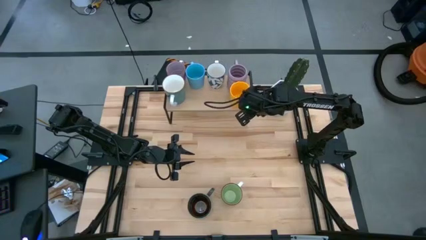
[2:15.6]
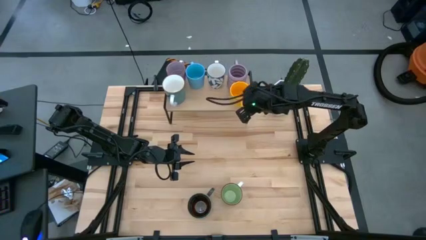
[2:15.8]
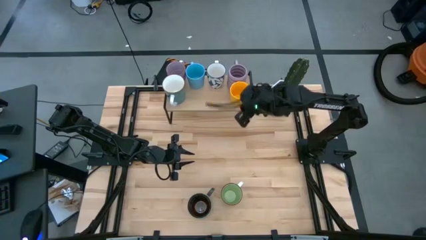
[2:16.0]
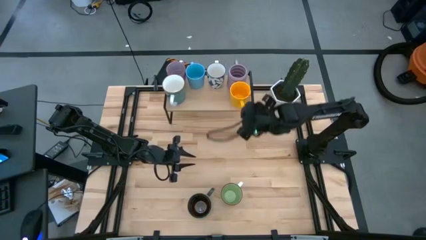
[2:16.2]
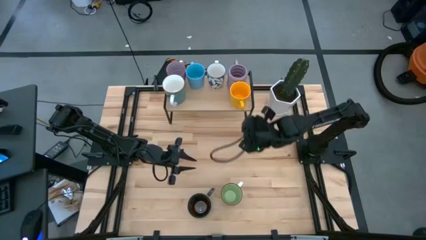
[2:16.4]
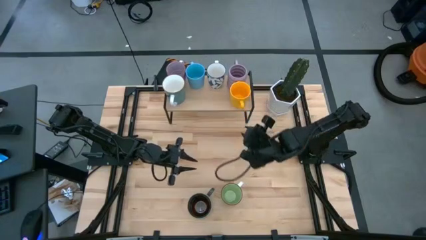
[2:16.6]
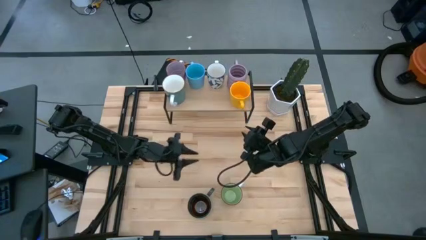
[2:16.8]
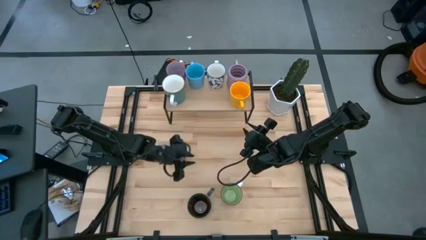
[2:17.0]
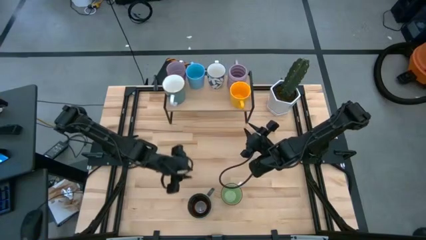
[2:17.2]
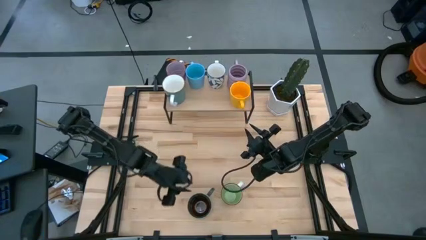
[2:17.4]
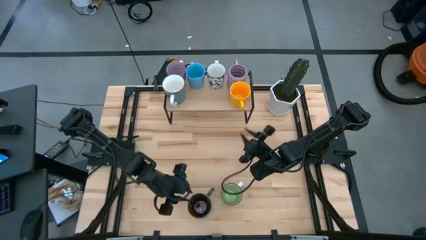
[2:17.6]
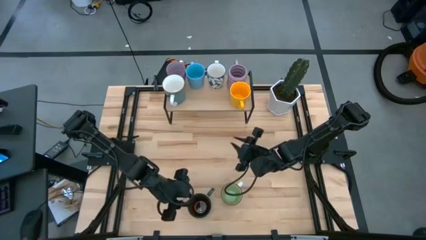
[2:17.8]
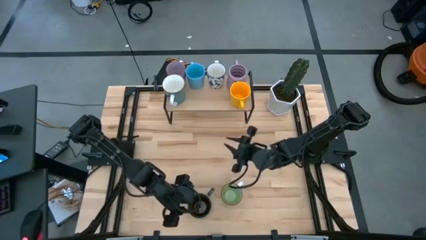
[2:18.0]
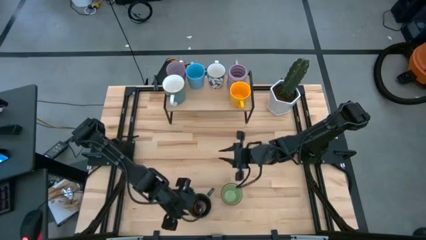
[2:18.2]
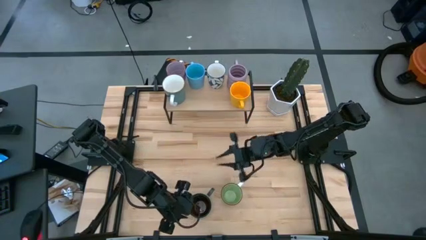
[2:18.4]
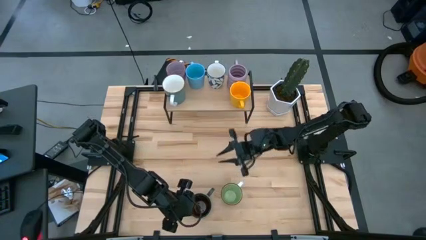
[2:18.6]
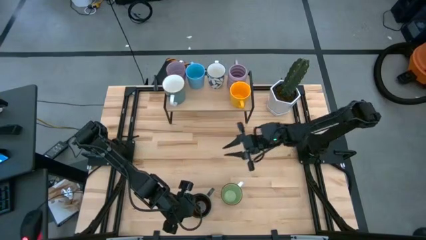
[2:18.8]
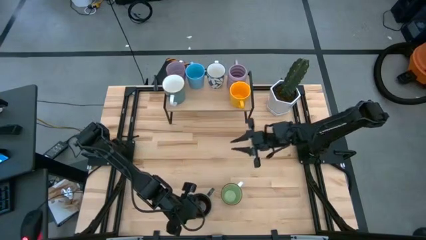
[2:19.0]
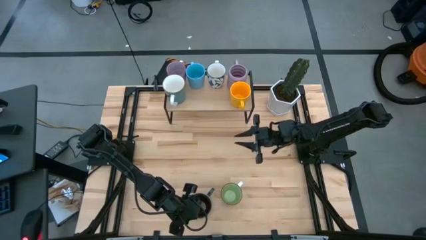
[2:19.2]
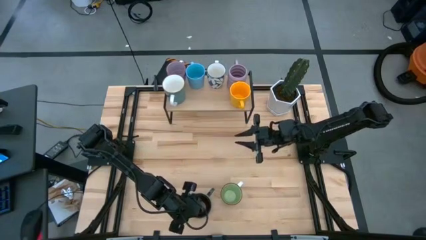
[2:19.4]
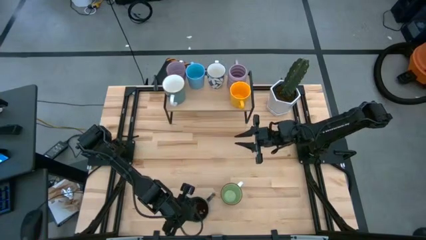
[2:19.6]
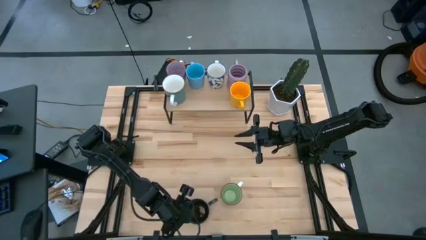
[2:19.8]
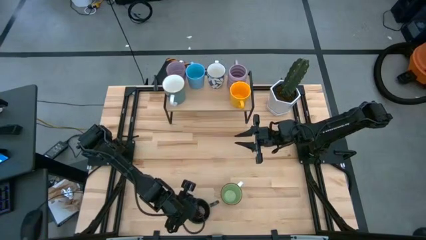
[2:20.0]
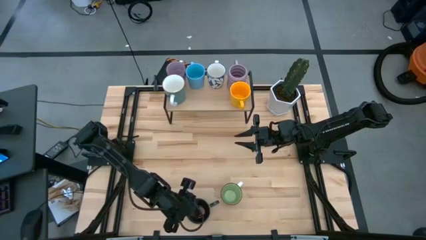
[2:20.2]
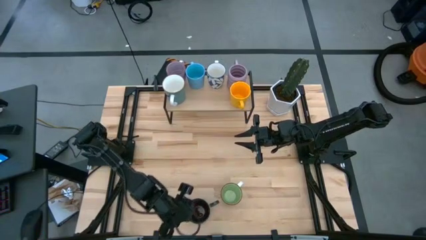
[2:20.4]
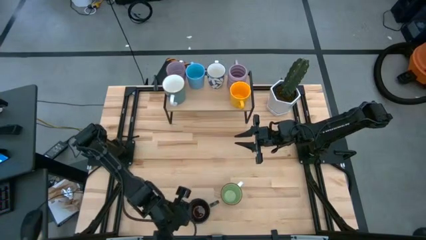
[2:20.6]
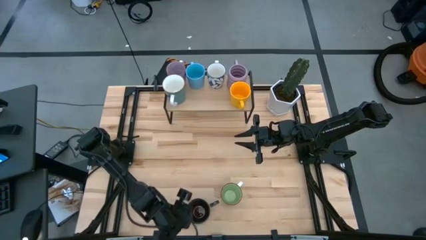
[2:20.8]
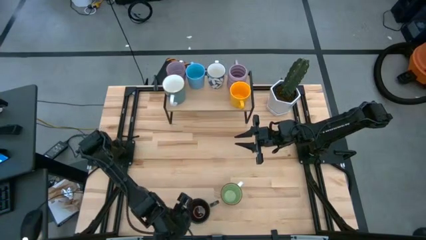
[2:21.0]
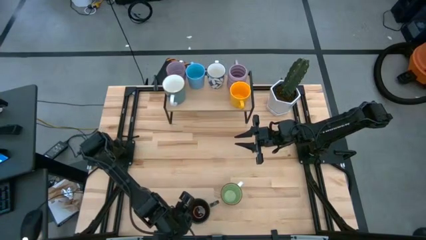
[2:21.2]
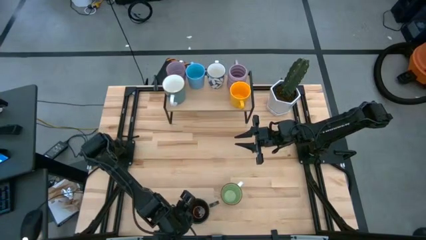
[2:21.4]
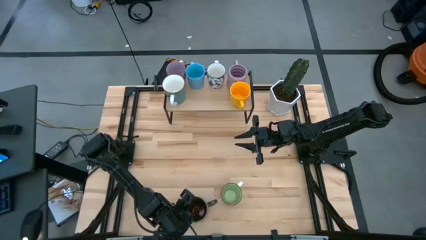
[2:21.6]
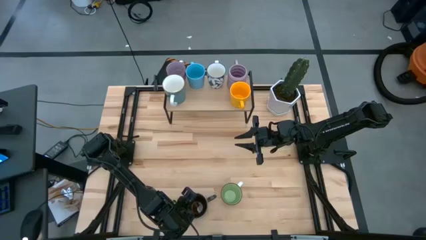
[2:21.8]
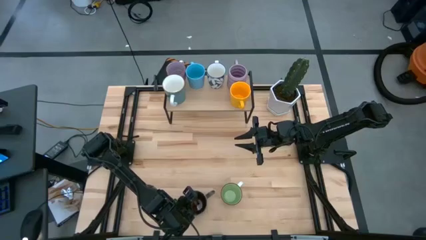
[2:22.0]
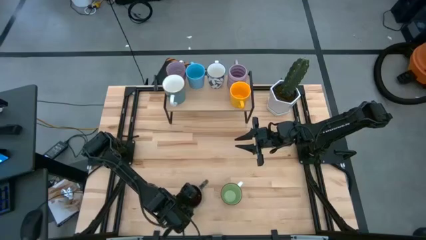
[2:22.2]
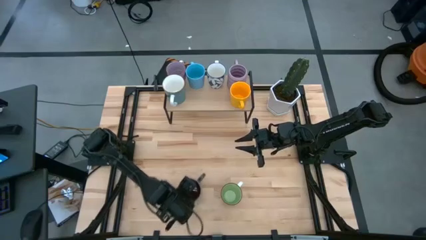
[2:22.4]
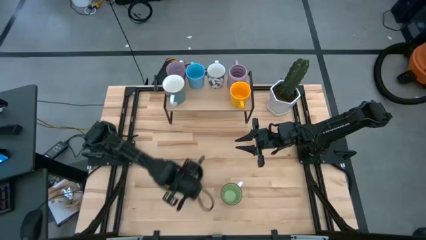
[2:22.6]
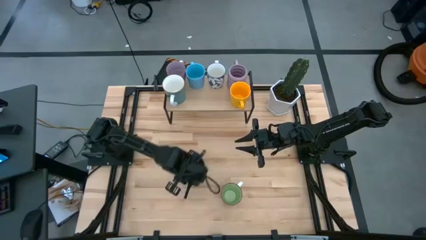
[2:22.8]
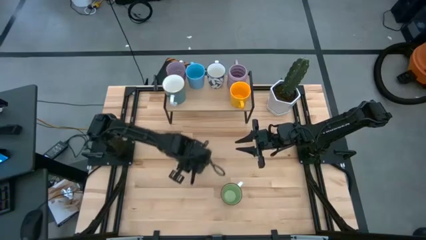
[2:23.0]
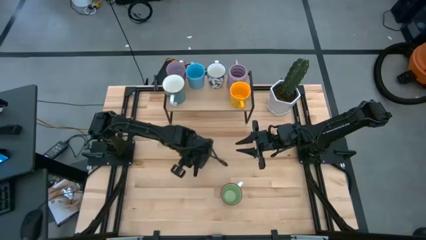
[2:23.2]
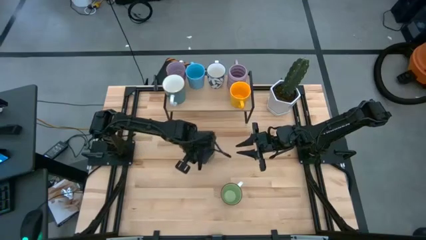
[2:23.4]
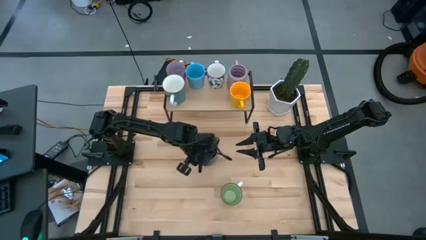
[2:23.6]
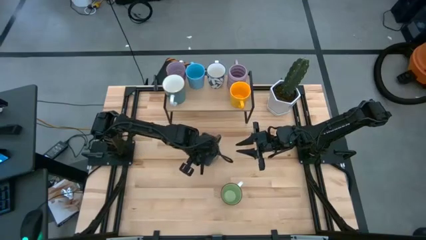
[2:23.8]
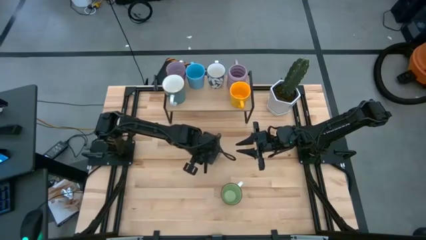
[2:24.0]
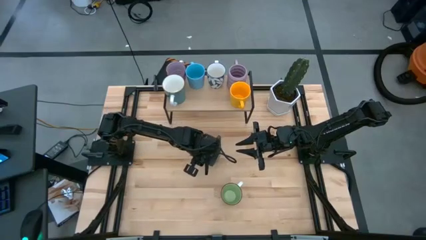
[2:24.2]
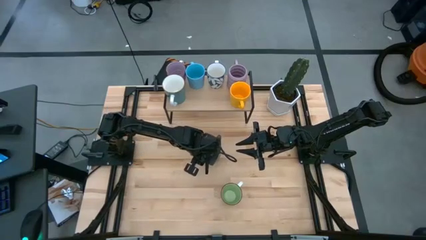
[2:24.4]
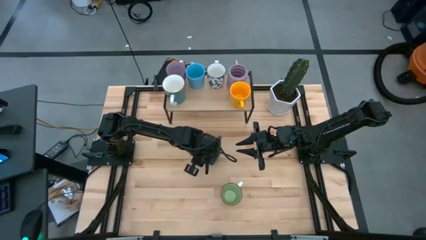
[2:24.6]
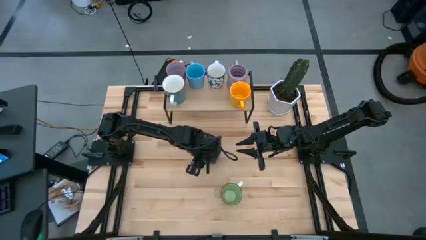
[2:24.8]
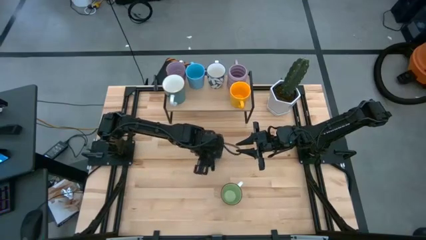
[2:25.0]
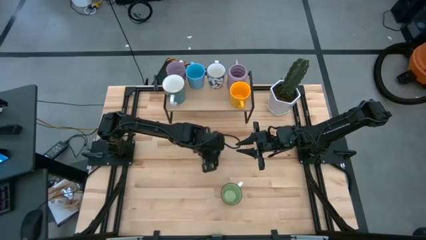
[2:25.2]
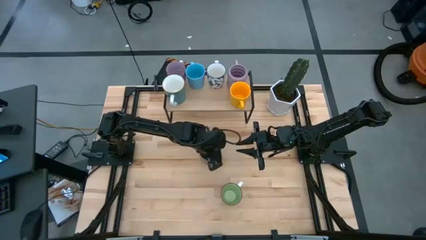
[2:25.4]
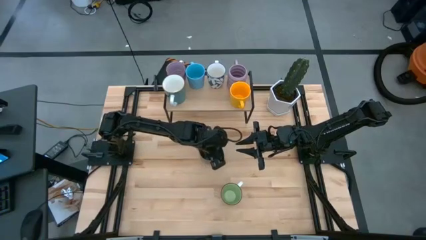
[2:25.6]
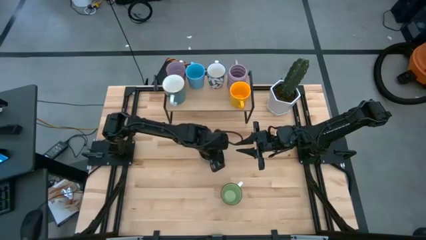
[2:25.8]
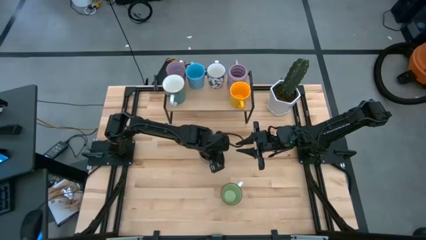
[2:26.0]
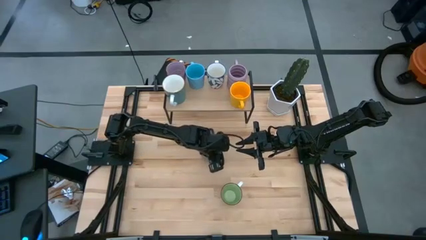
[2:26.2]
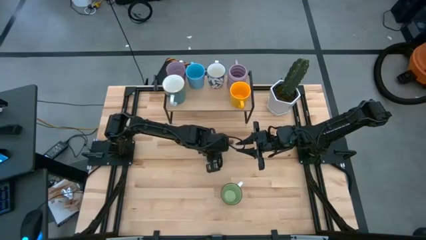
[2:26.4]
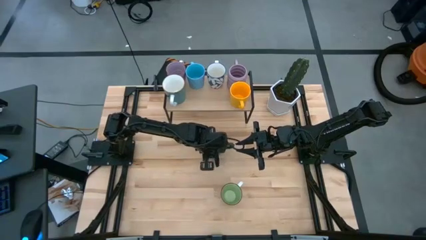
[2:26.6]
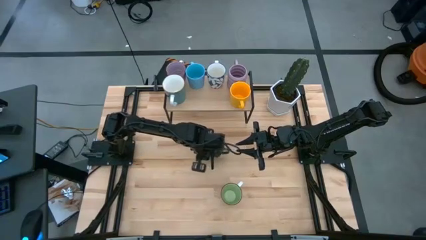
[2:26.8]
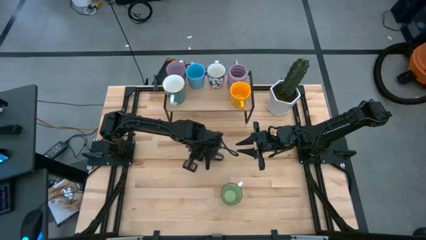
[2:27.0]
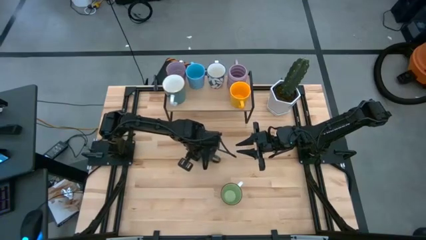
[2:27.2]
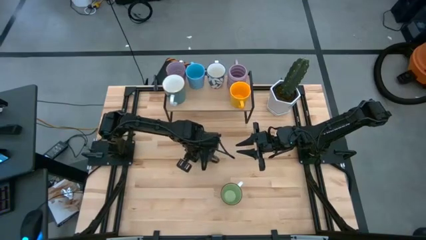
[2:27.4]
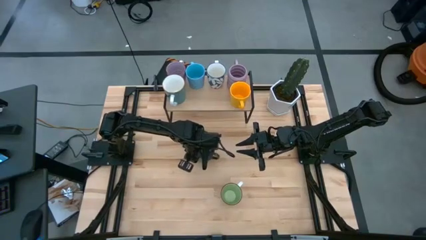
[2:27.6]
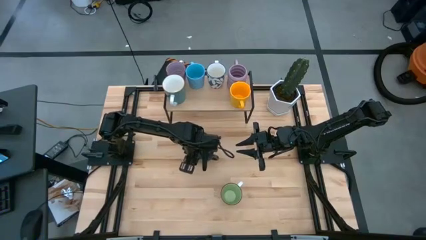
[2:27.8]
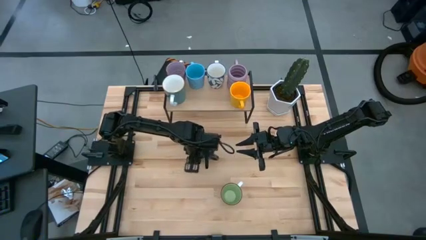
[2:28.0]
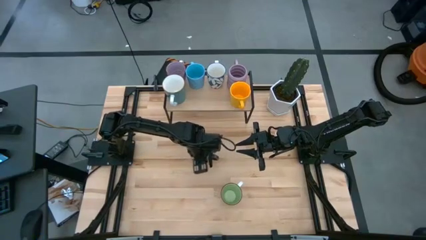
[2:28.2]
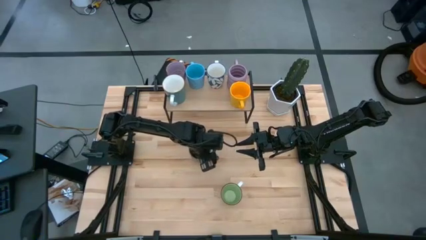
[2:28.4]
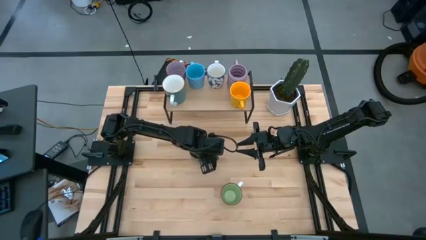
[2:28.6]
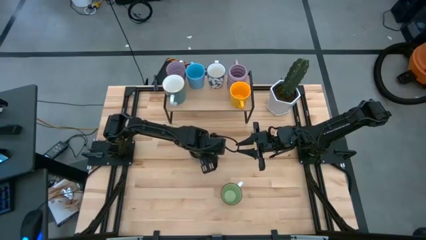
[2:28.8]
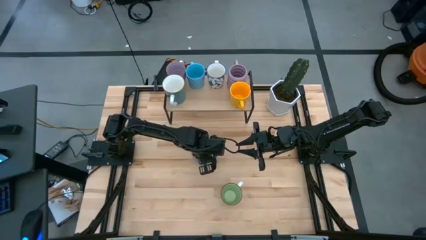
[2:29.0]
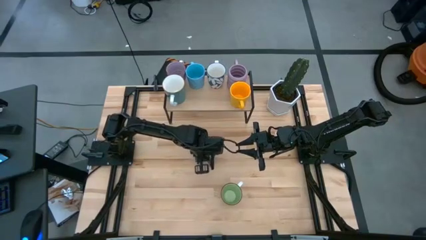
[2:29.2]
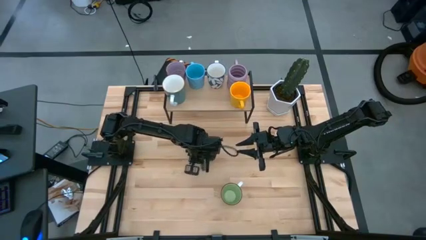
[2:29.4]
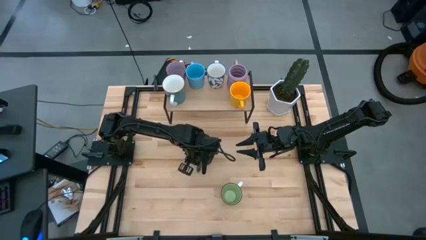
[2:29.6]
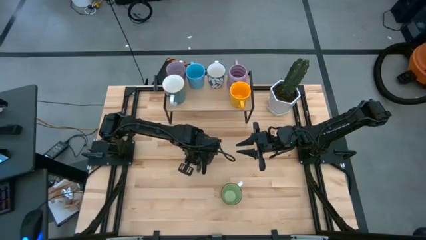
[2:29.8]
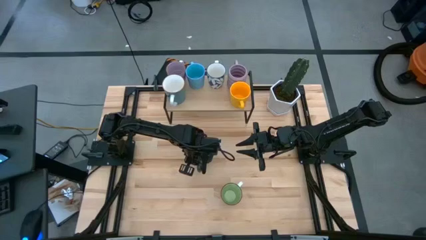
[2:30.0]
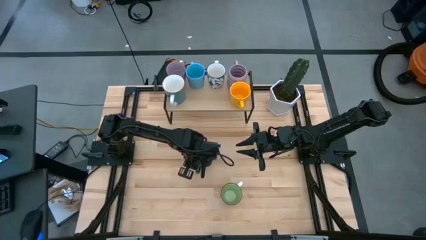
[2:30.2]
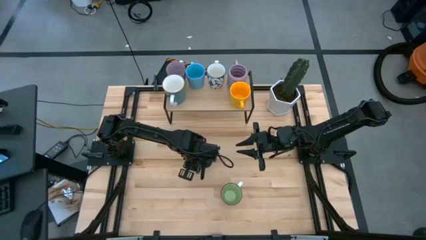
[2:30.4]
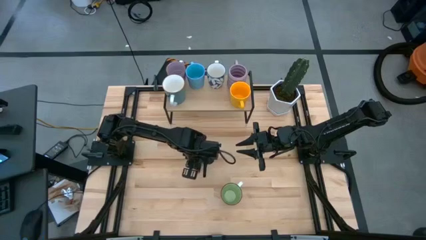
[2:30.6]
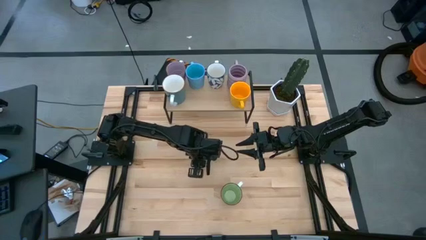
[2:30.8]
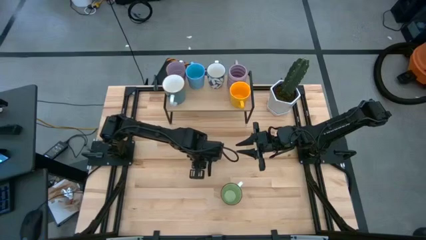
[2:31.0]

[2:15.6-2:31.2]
Task: Place coffee mugs
Put the dark blue mug on the shelf

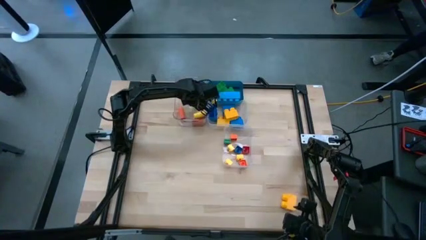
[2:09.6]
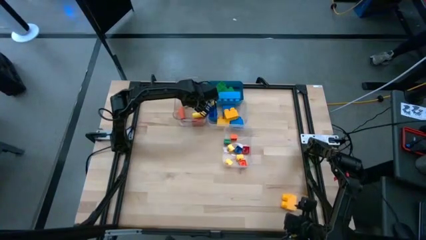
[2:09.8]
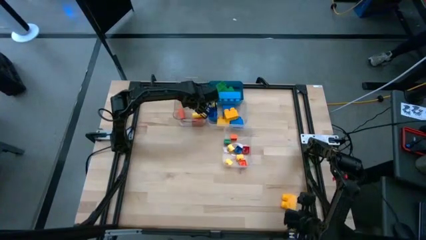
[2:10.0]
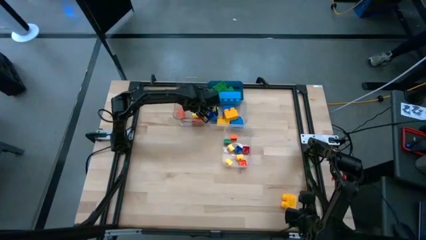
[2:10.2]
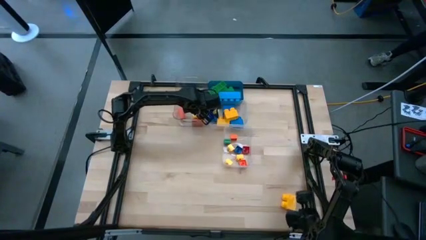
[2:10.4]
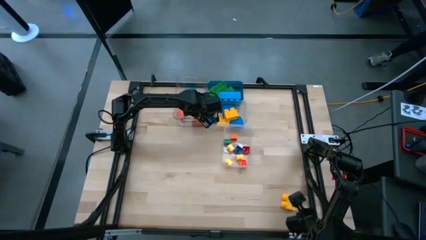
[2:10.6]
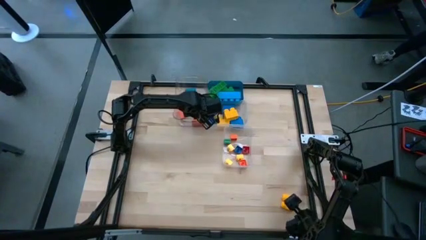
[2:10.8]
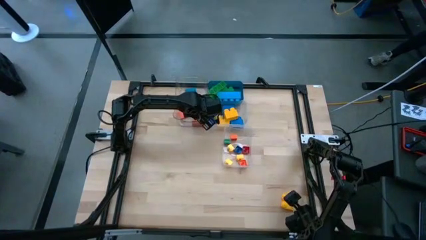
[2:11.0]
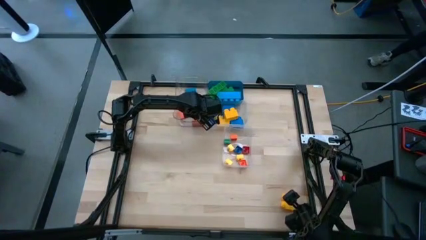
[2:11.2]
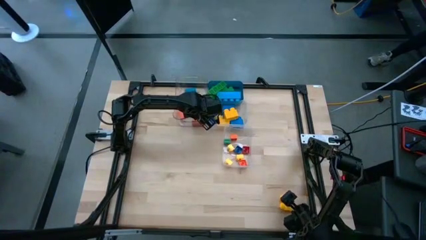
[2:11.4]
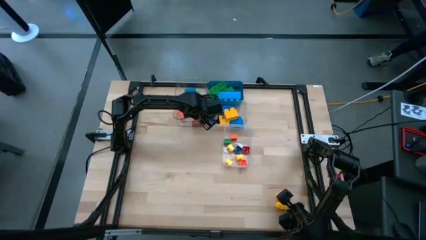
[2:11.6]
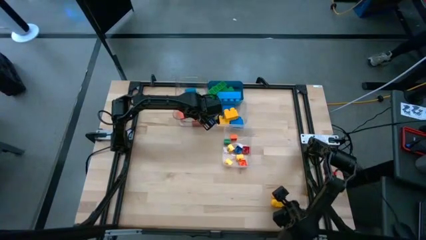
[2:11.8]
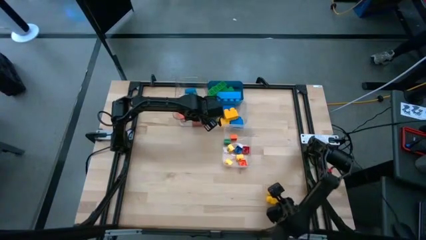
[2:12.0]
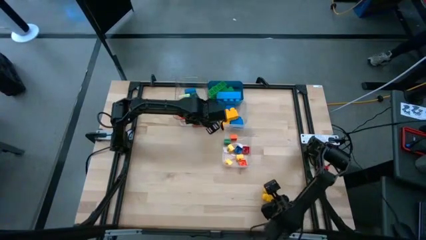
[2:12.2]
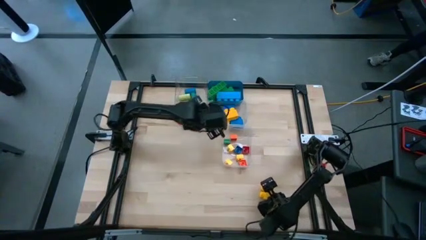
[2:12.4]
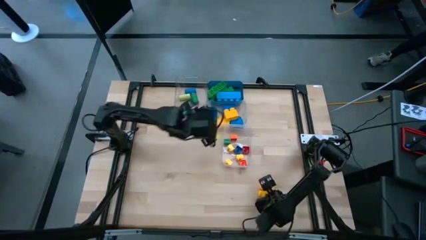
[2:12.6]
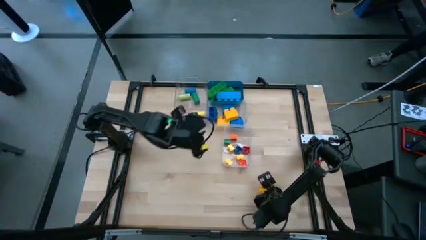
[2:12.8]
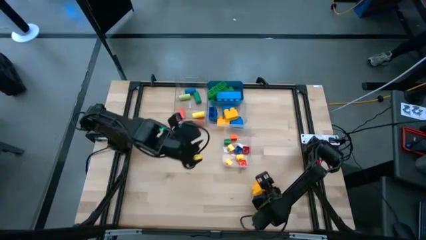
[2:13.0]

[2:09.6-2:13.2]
Task: Sort blocks by size
Put the yellow 2 stud game piece into the top right transparent bin
